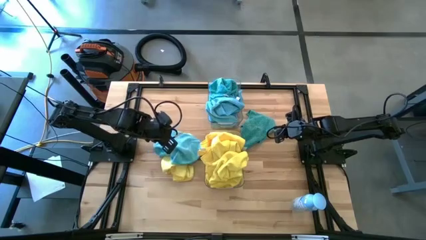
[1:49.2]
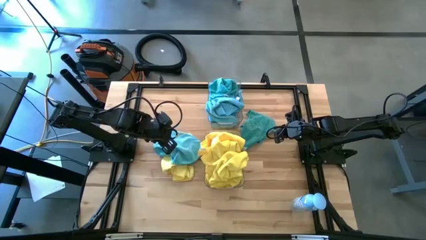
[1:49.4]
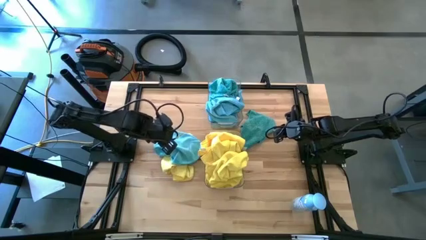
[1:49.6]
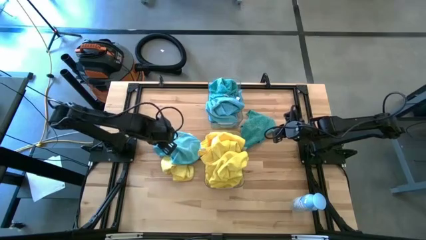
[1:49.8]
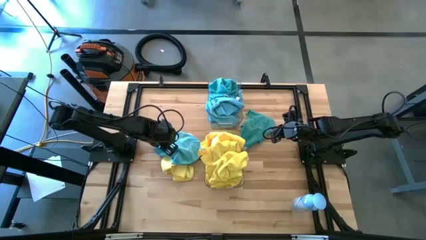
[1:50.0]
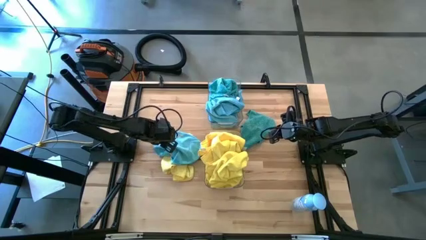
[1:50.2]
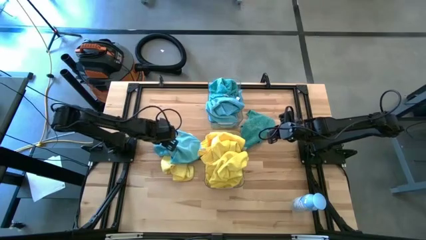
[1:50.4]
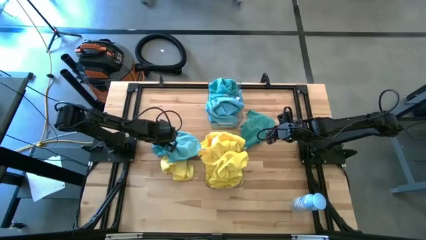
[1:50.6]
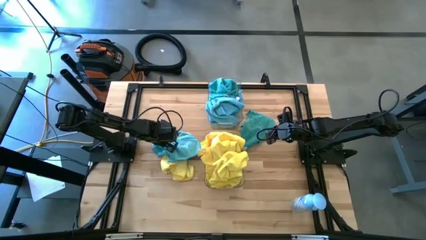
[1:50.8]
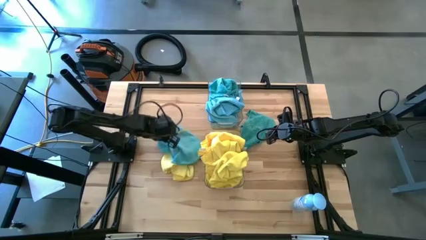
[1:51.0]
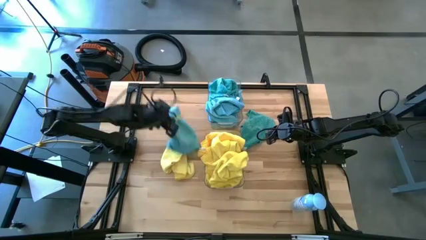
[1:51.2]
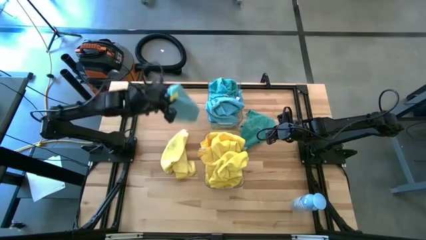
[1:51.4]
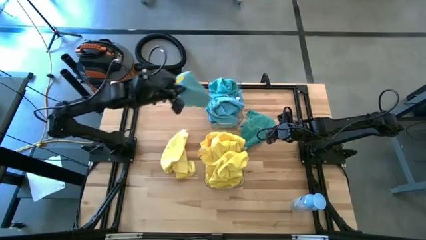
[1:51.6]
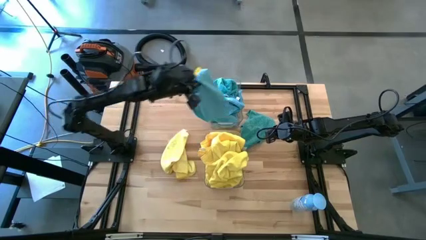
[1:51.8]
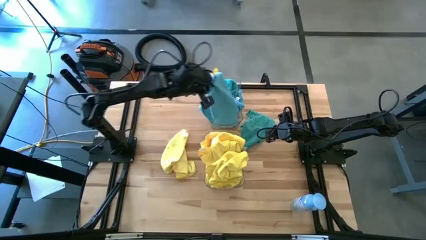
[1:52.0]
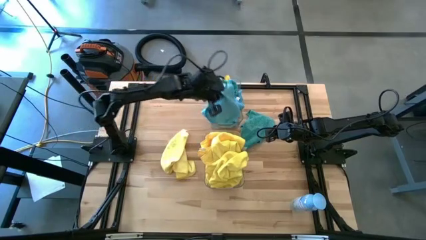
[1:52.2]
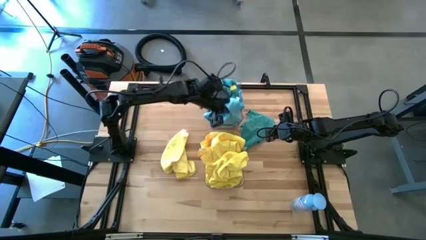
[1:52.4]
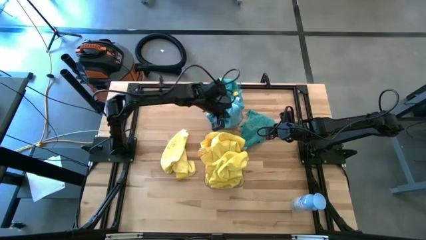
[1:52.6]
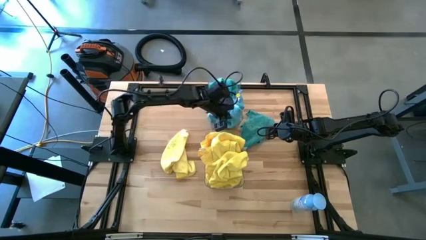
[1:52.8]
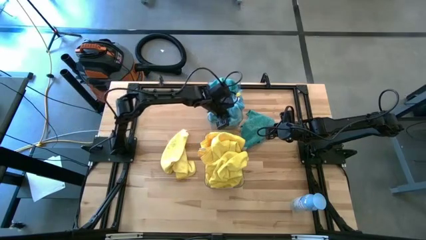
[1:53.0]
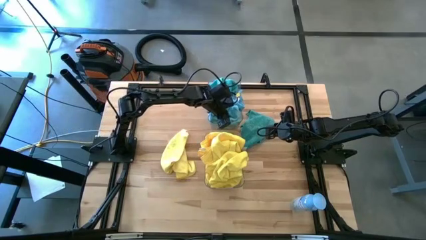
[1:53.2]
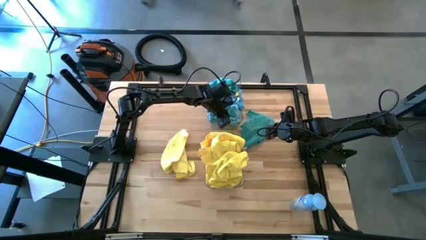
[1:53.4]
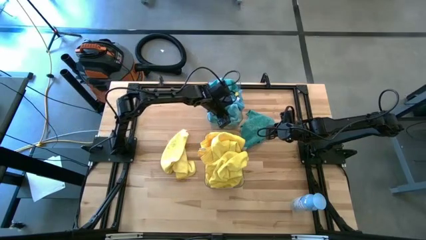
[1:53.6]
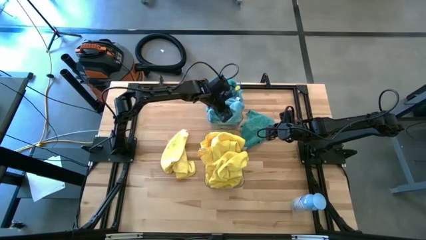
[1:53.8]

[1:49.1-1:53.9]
Task: Sort microfiber towel by color & place in baskets
Put the blue towel into the top transparent bin

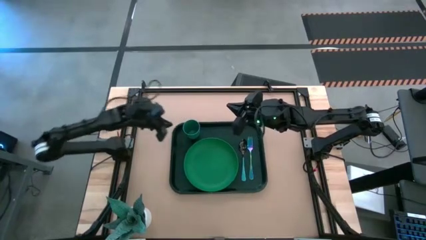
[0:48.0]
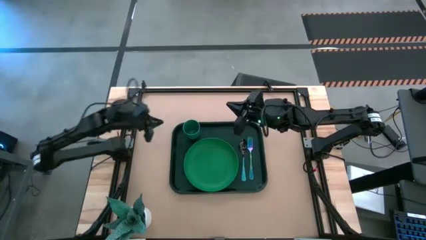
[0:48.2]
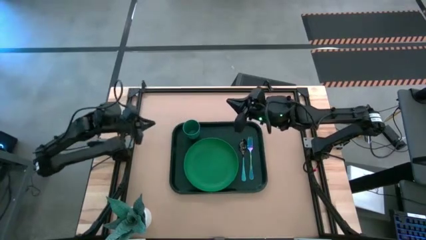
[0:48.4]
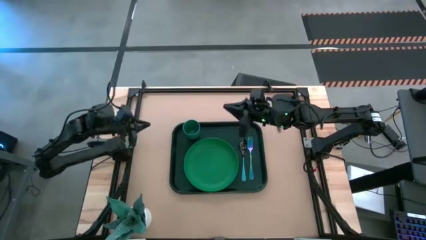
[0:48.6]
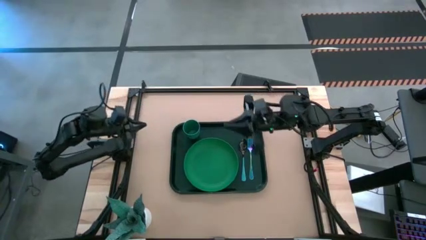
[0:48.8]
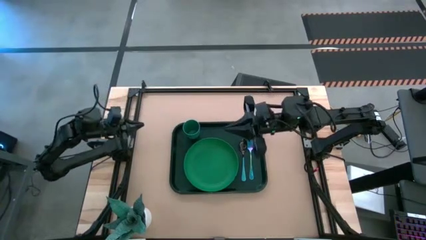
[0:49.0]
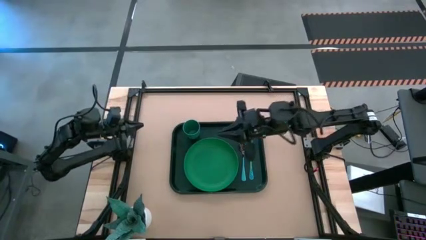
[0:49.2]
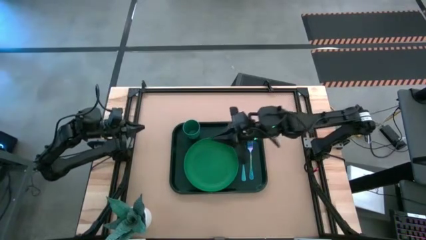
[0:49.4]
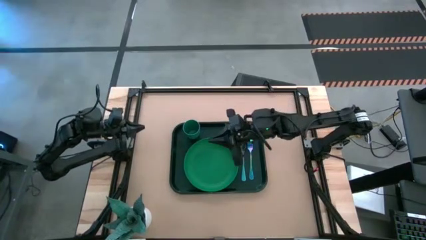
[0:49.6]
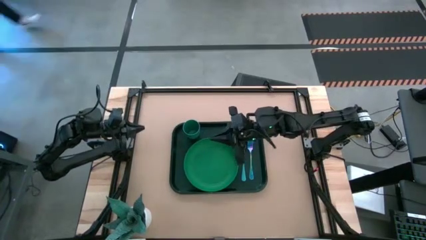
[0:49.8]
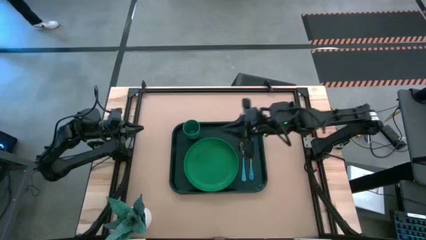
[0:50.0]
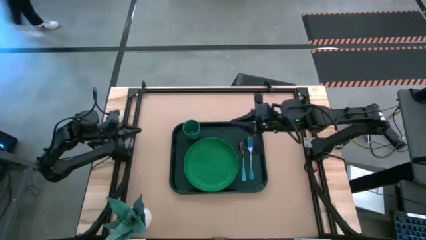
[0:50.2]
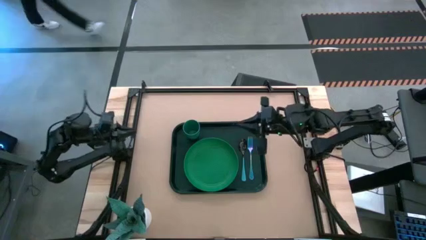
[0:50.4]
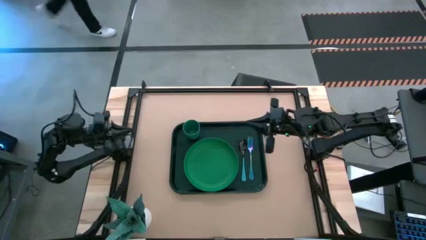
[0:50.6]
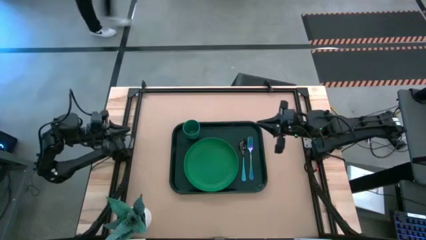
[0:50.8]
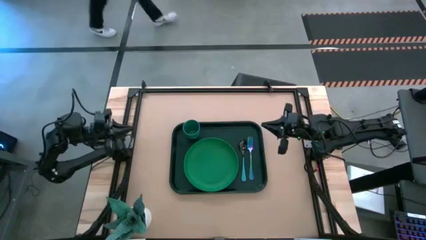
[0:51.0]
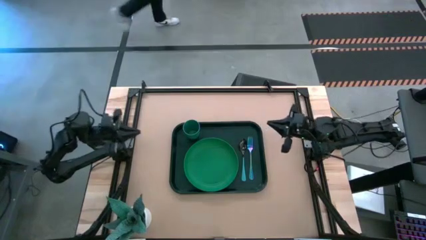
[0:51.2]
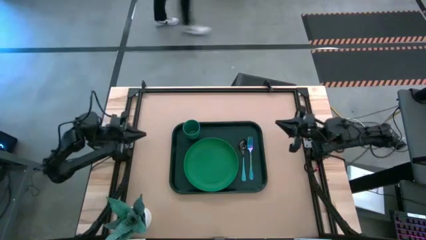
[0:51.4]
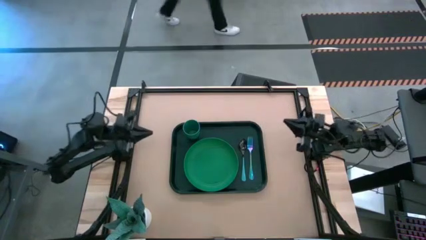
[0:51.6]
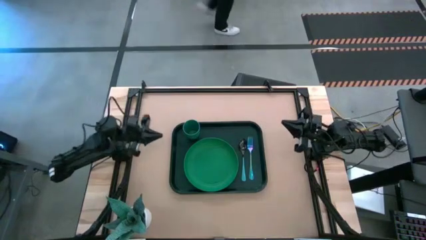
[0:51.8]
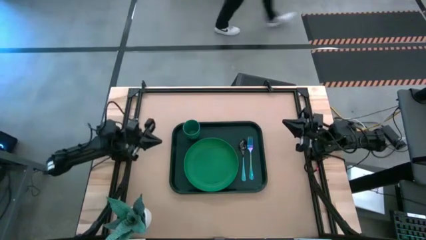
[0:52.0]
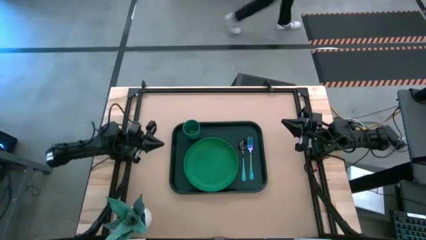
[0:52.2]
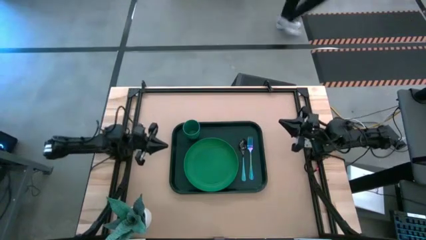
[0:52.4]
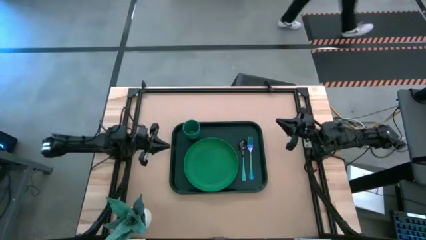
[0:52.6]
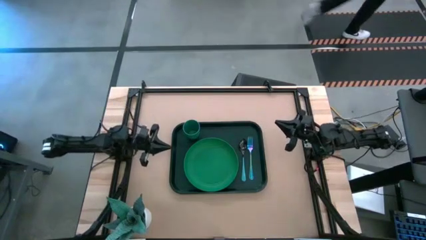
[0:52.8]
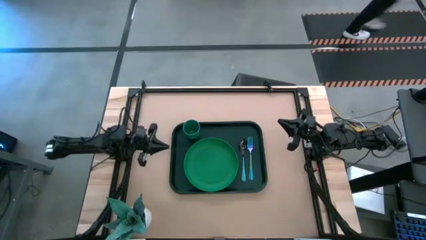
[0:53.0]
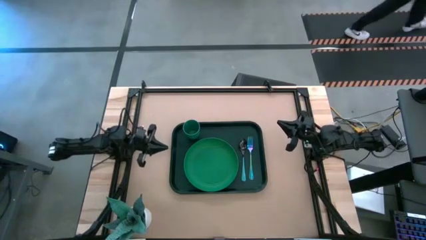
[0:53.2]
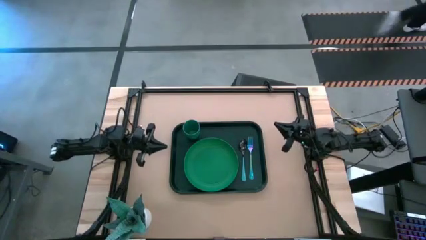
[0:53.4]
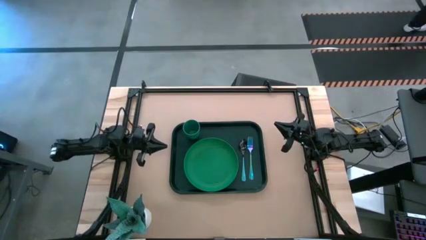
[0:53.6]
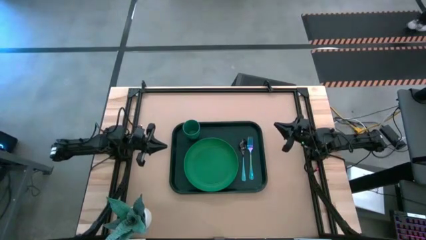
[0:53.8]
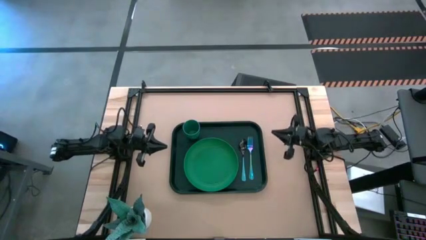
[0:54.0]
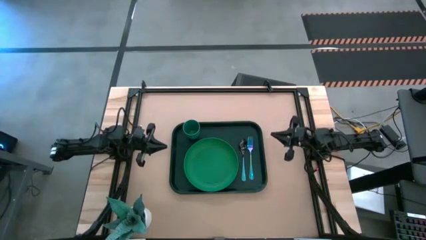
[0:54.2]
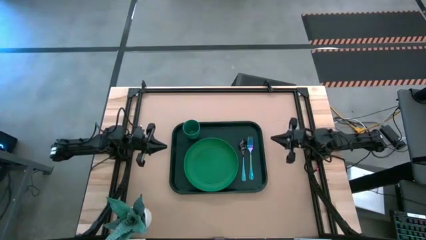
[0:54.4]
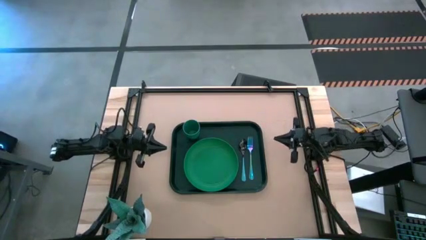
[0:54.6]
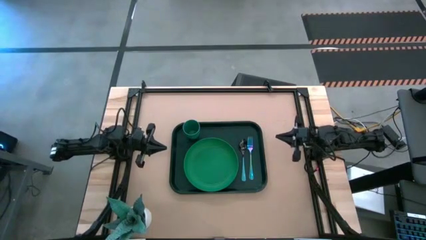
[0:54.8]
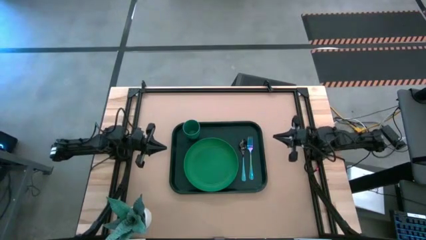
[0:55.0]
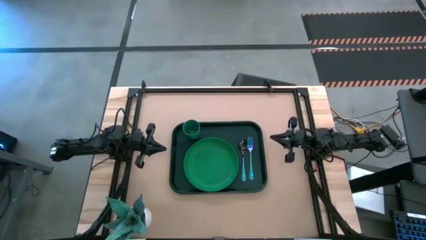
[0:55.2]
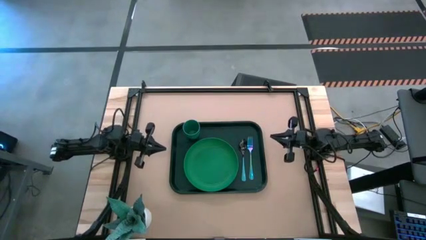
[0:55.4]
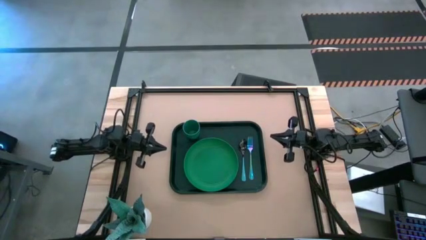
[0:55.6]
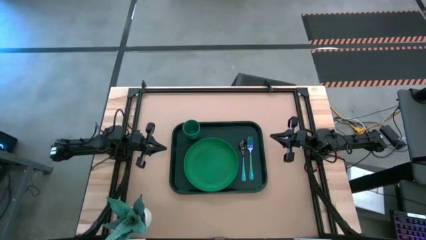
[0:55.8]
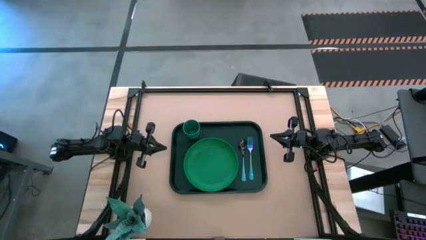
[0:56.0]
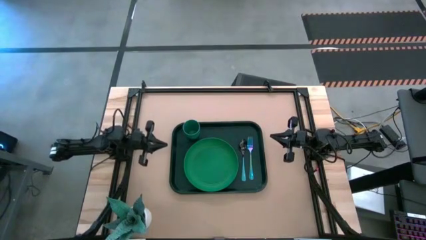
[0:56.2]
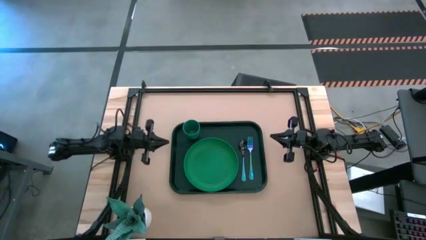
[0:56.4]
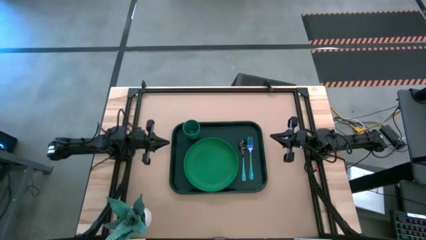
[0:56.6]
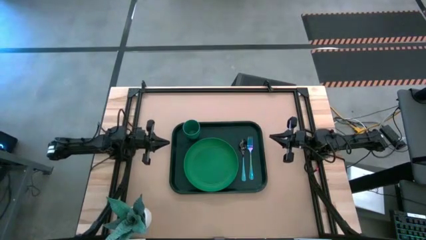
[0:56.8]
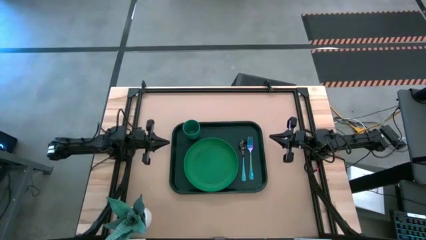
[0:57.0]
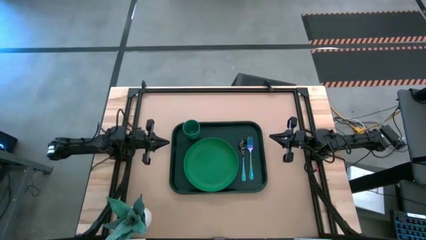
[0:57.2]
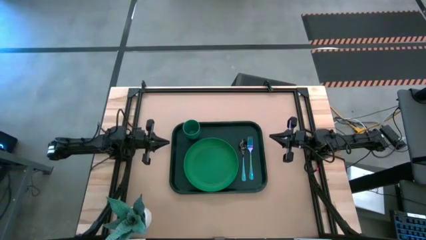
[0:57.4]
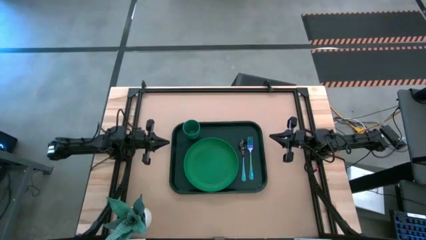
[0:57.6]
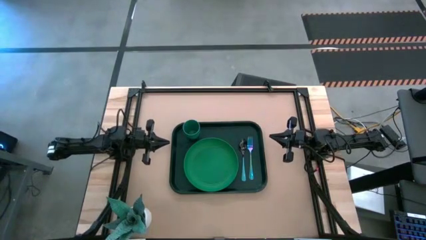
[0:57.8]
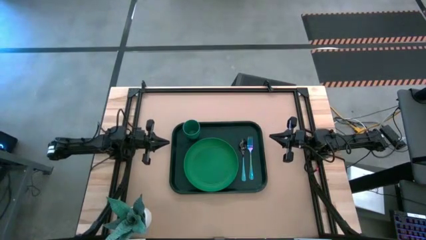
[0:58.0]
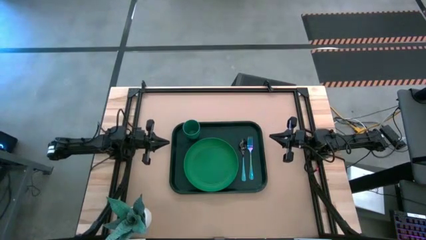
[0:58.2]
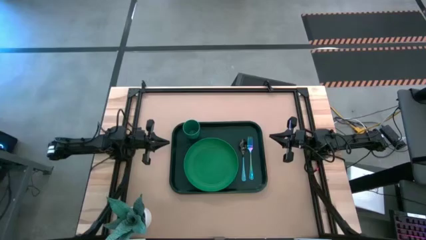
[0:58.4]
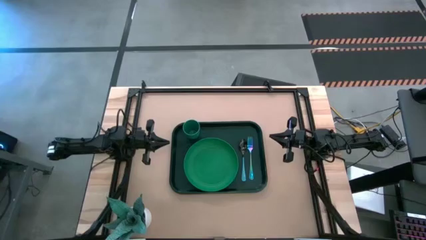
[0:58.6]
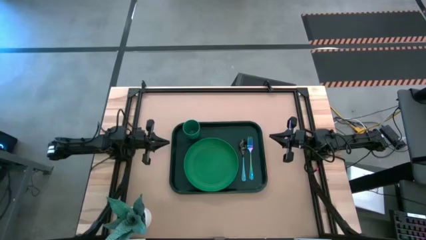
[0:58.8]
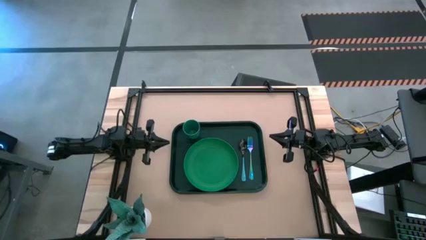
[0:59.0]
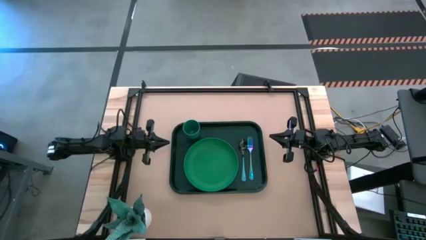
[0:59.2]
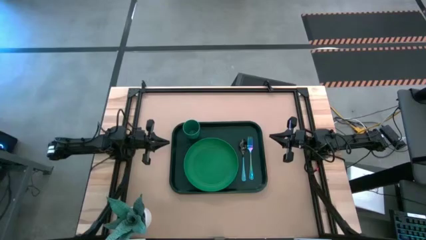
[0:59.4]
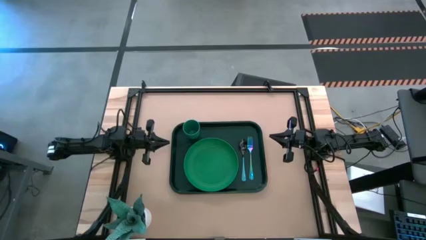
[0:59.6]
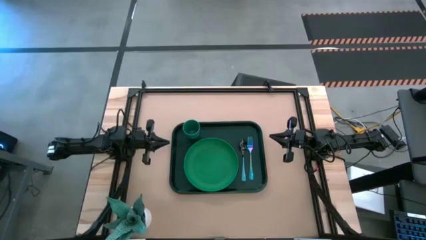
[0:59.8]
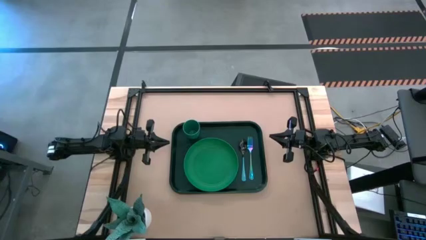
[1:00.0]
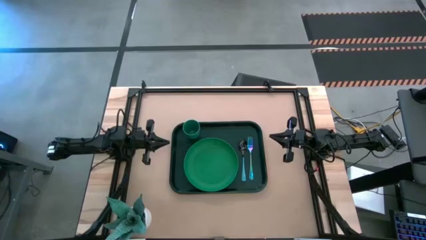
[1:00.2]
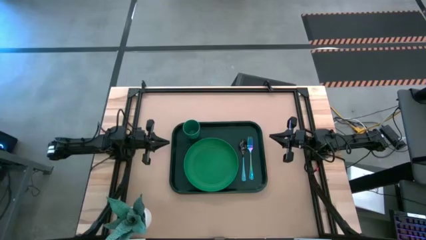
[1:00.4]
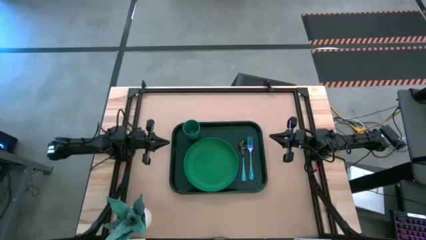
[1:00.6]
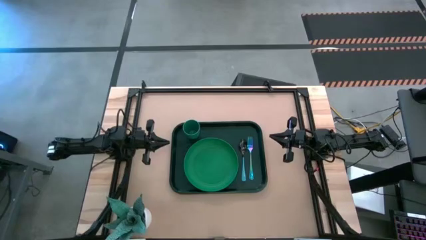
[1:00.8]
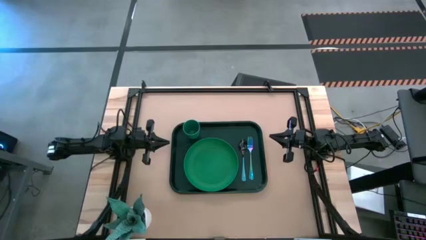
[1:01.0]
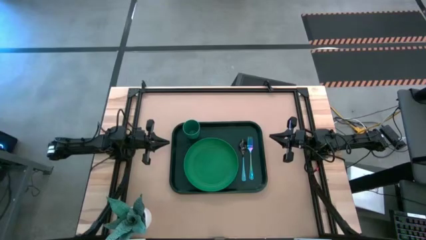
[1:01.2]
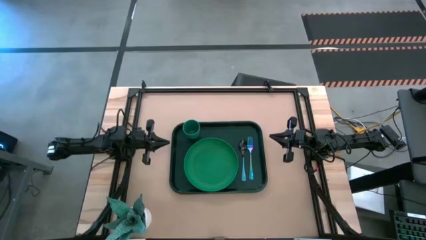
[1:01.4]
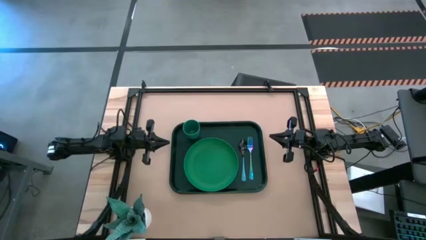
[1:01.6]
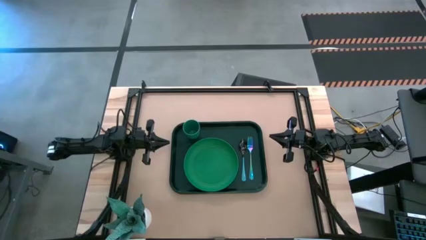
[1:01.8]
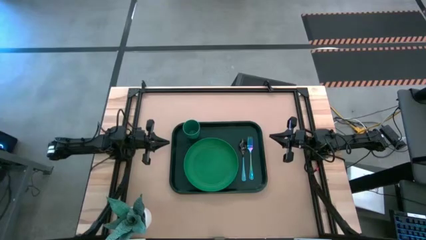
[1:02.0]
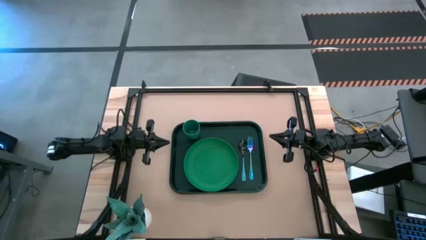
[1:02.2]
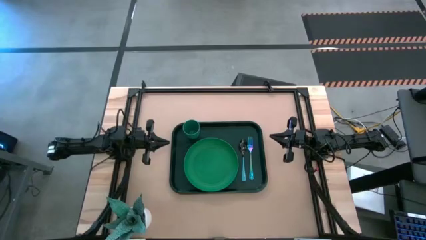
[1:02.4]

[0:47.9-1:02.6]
Task: Pick and place plate/cup/fork/spoon on tray
Return to Home Position
